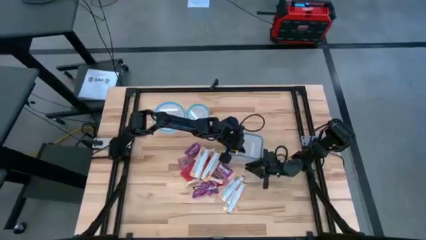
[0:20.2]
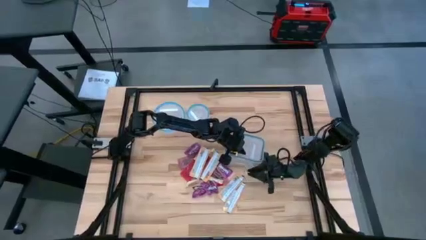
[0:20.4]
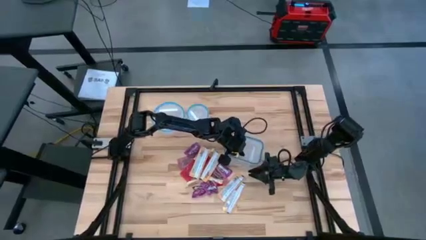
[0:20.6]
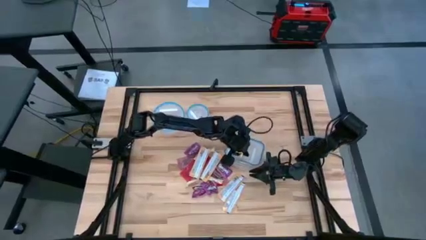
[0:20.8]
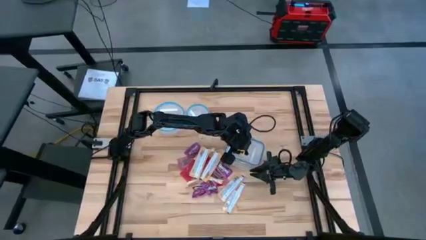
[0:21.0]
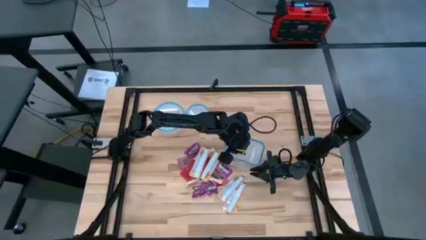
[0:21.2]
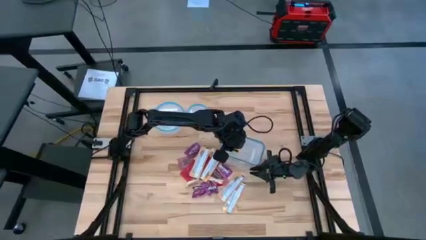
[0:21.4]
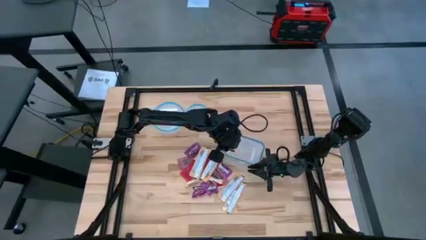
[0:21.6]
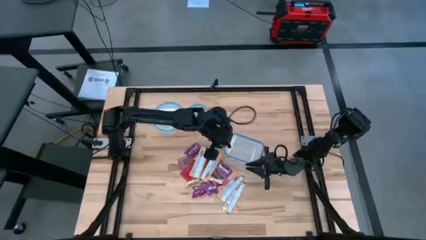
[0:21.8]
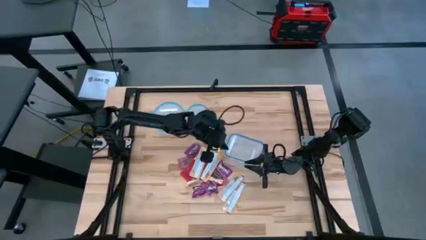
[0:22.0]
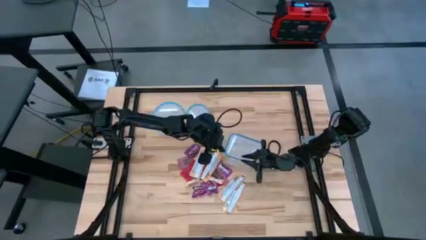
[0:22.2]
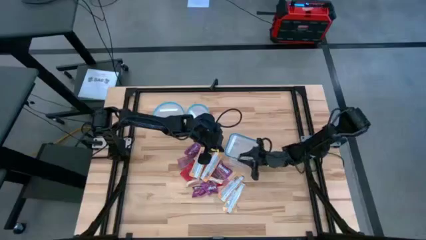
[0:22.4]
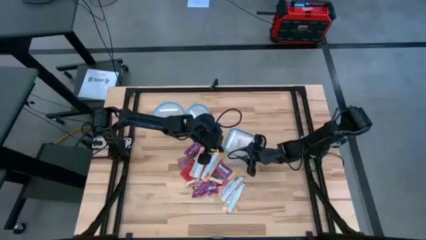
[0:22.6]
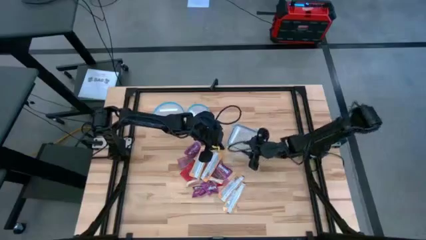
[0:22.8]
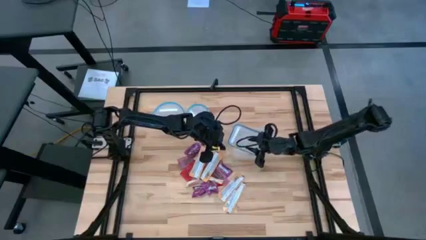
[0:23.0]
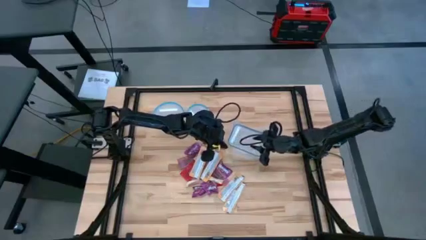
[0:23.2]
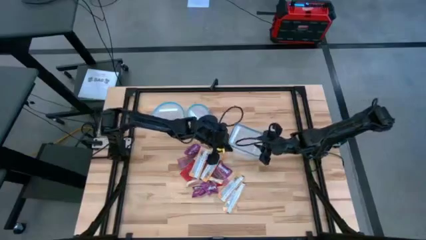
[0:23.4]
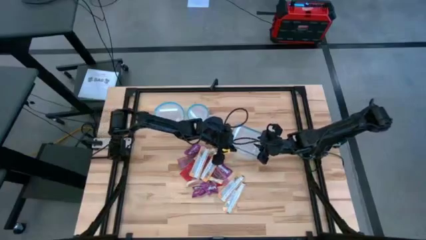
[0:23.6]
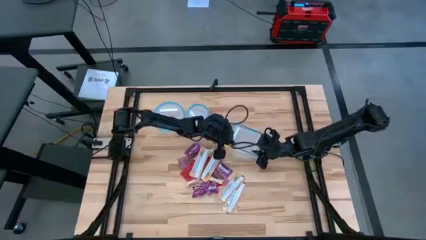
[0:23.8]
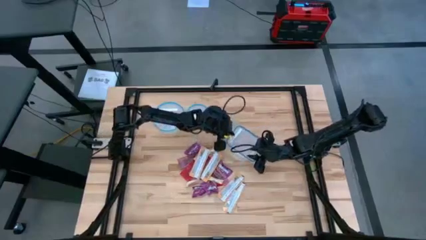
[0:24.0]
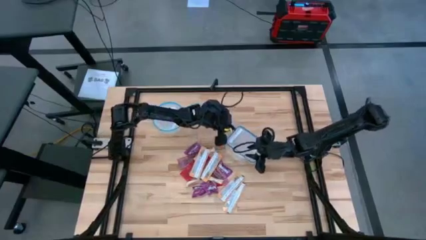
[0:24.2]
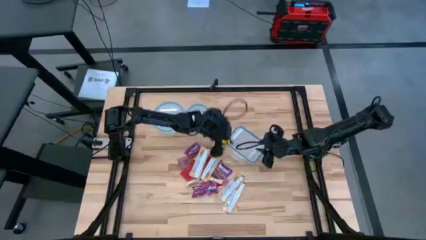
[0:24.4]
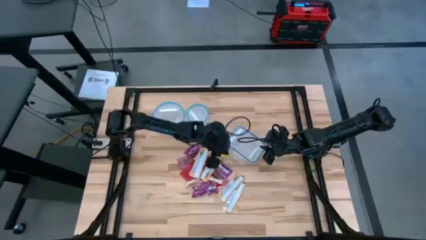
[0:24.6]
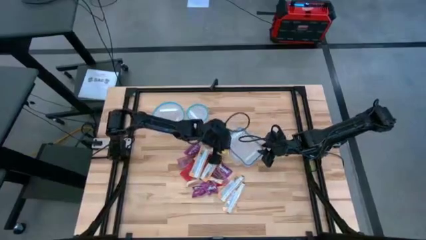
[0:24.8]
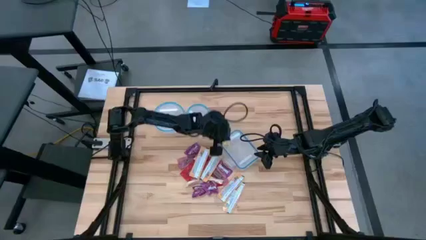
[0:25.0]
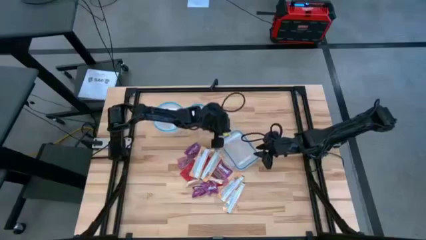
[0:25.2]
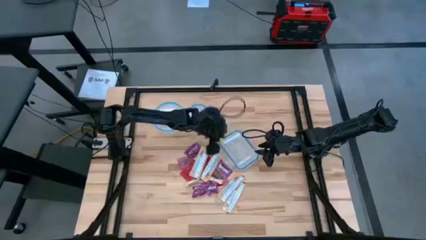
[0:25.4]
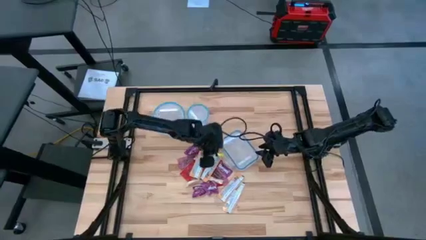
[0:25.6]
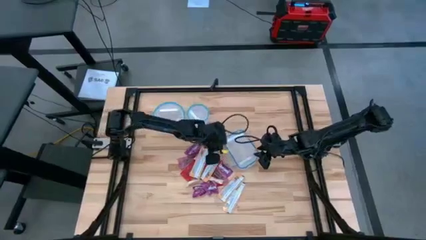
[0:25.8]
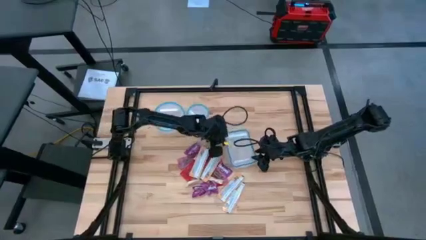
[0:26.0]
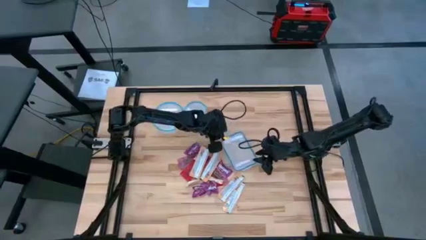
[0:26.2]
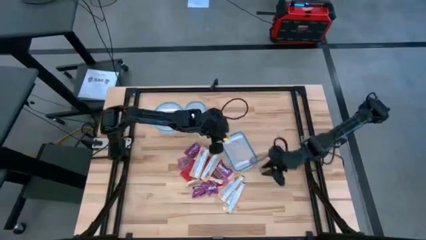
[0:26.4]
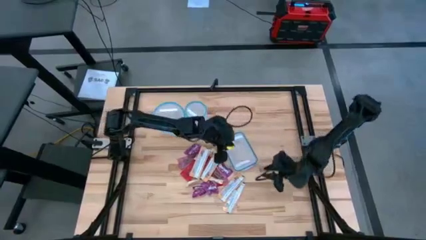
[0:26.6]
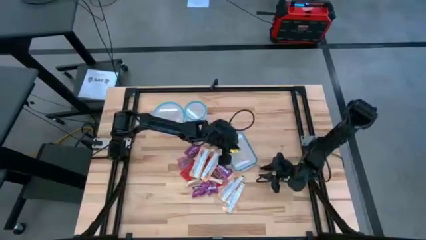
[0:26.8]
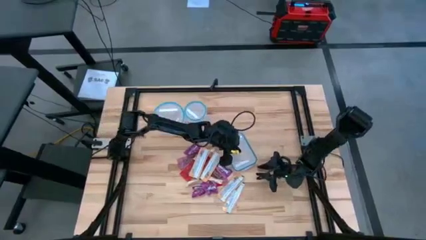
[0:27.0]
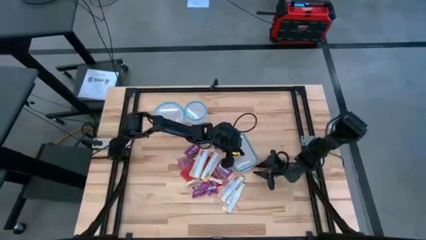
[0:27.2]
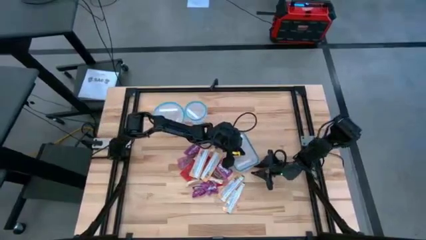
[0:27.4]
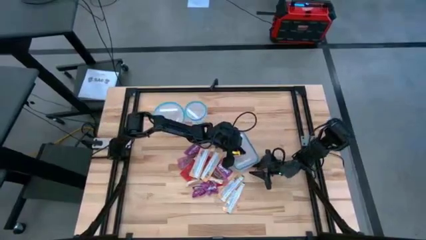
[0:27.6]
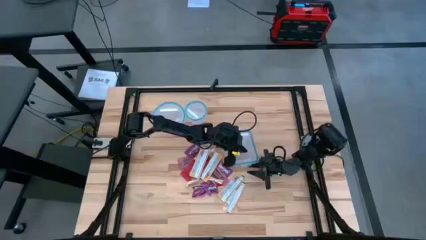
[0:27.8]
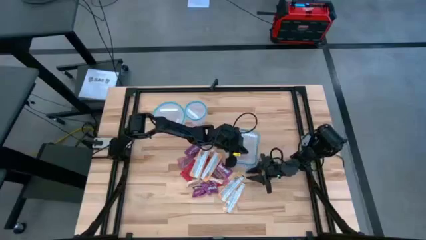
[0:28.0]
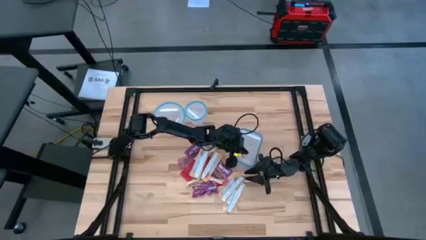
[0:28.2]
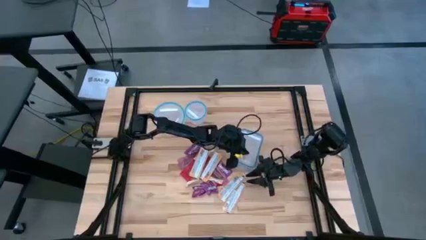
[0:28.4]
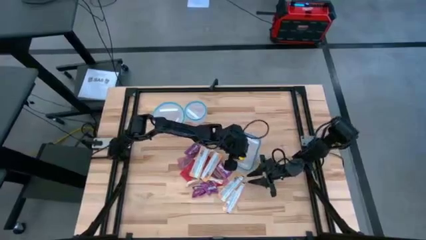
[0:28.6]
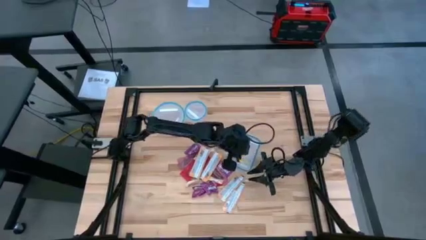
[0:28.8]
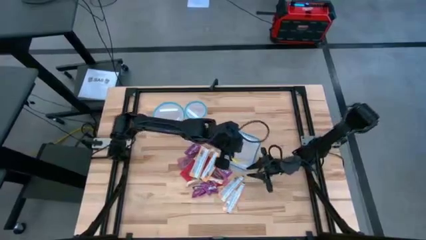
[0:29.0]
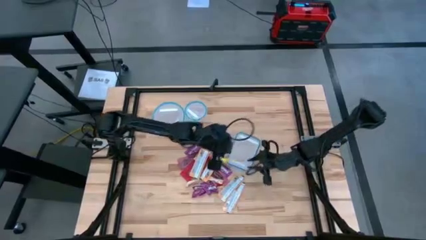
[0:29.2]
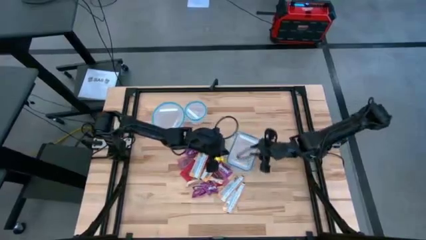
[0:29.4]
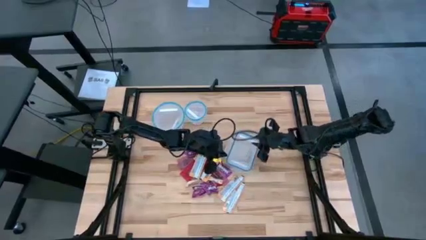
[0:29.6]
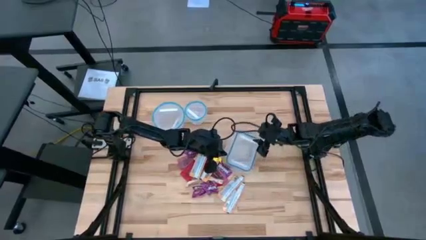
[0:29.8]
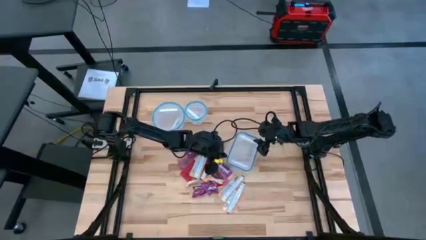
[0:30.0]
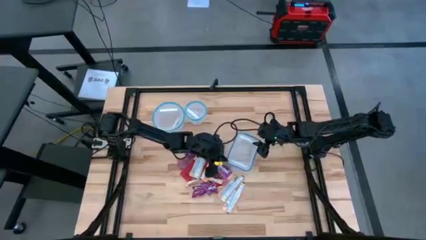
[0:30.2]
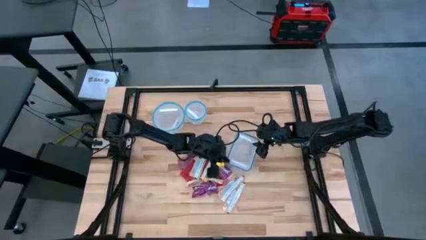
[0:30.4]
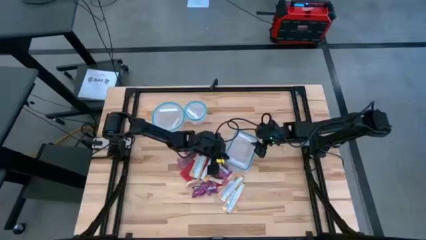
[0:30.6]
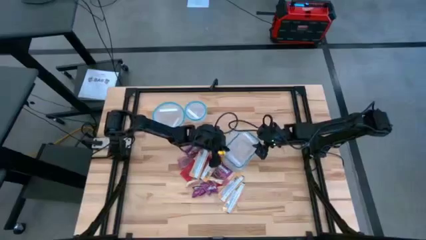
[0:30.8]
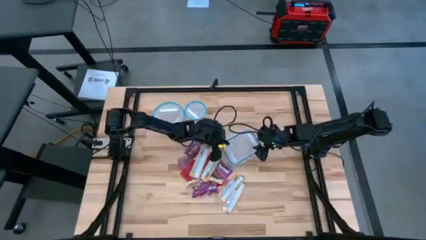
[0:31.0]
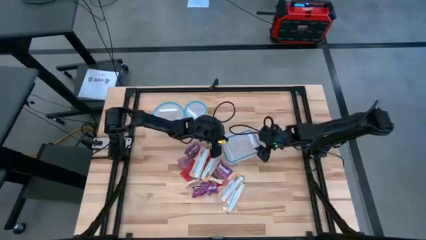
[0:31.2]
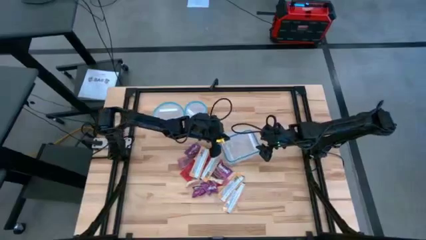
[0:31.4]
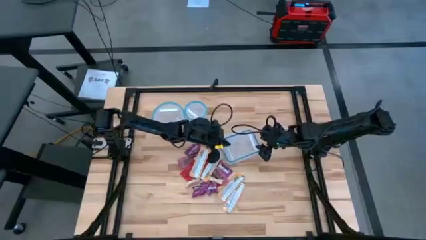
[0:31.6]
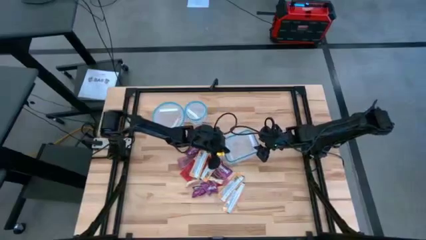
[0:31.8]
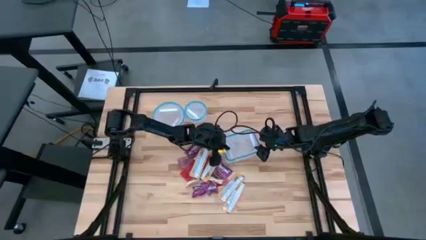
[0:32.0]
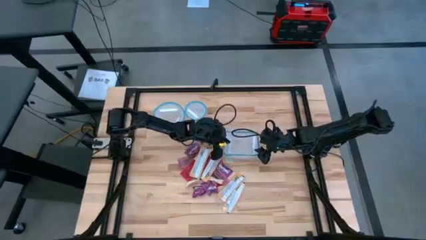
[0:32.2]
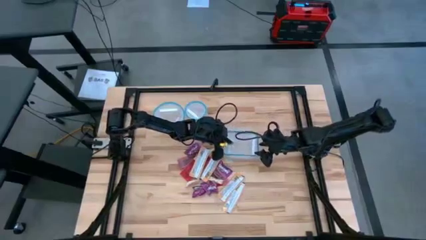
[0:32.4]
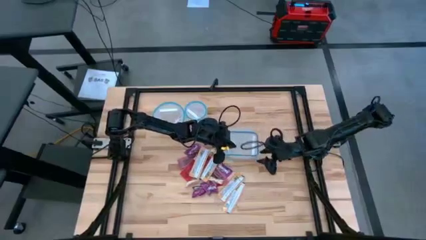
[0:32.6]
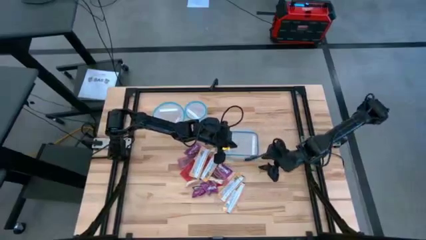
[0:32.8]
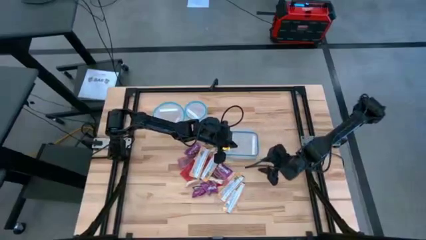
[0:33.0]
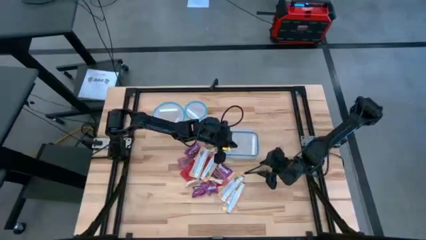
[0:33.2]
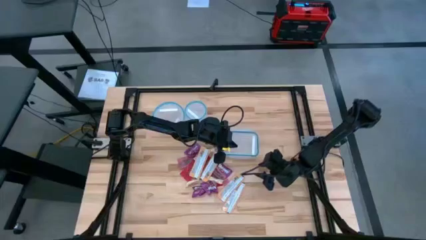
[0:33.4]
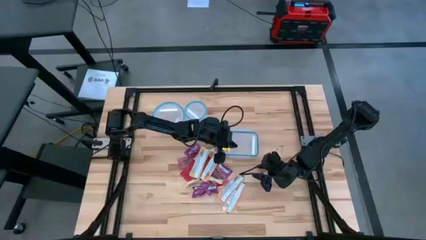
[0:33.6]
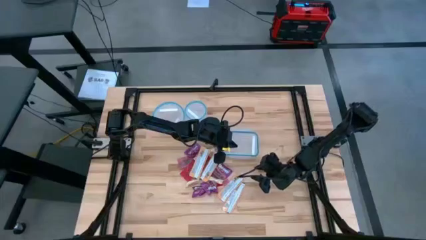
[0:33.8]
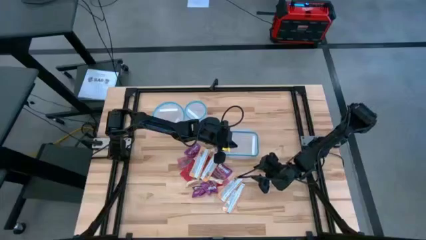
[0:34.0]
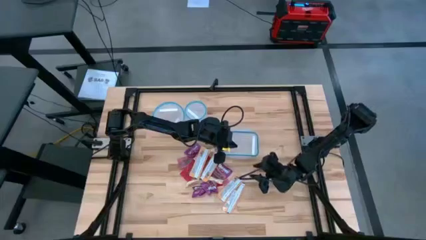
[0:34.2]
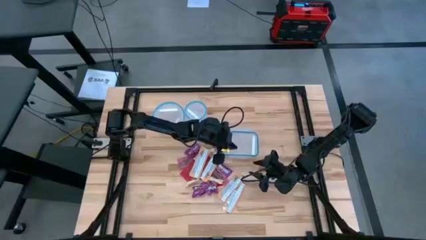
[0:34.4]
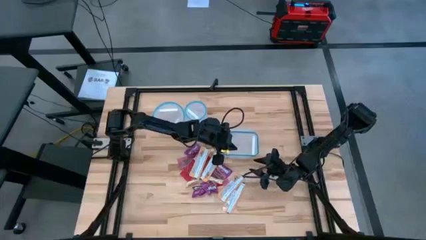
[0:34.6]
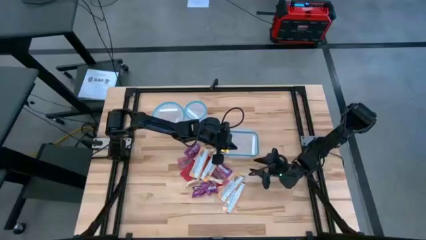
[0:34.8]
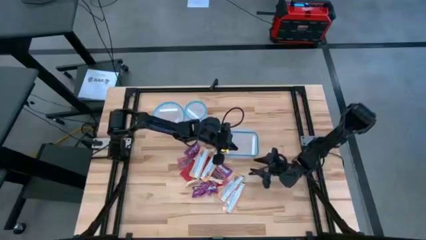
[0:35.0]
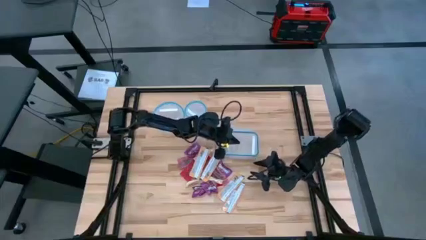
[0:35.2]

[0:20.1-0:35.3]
Task: Sort candy
Open the rectangular transparent bin
